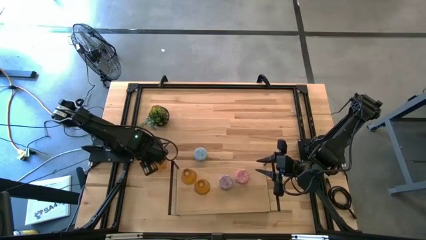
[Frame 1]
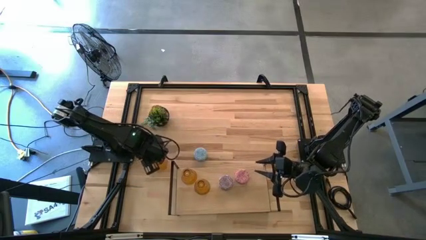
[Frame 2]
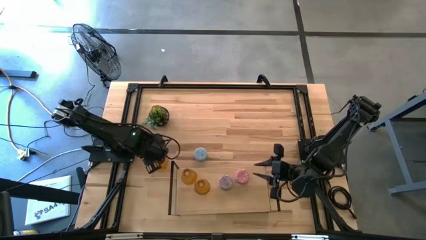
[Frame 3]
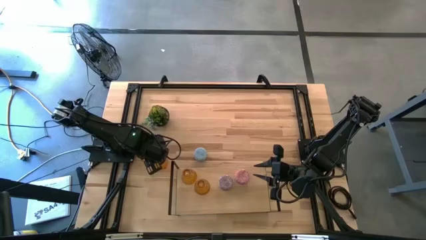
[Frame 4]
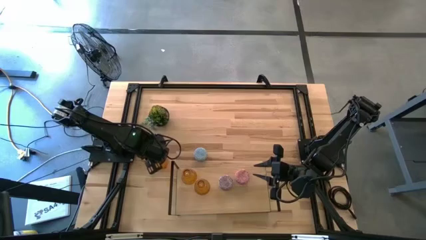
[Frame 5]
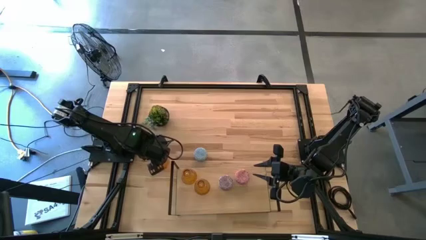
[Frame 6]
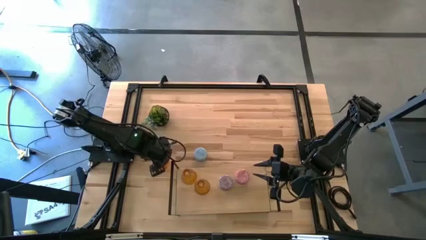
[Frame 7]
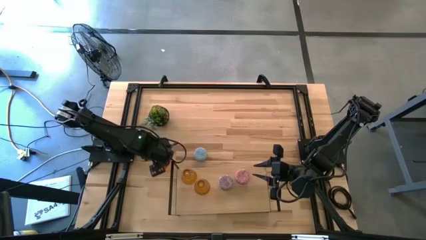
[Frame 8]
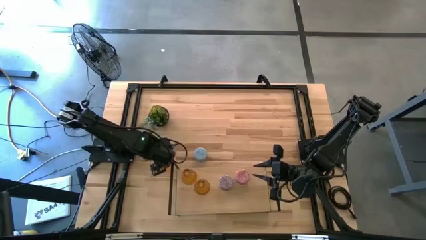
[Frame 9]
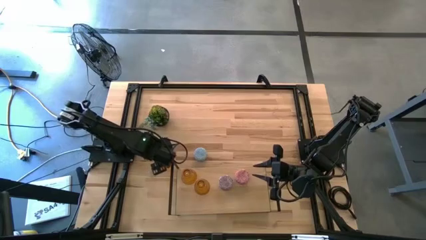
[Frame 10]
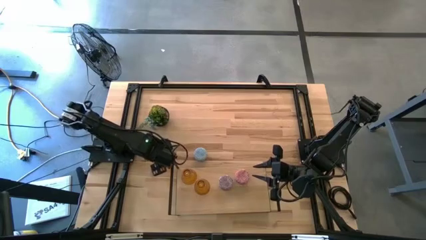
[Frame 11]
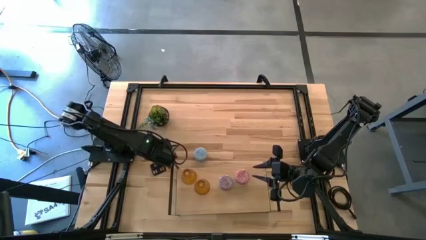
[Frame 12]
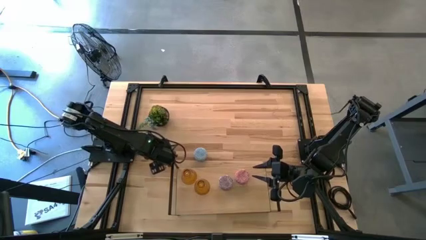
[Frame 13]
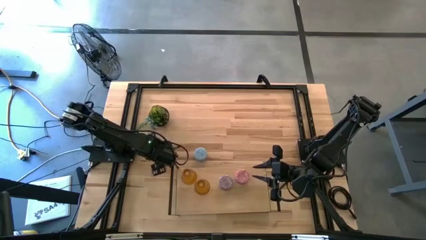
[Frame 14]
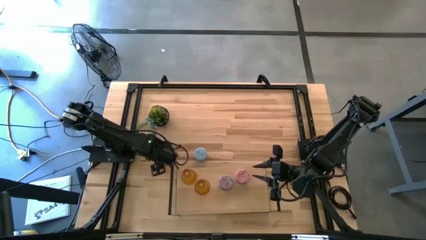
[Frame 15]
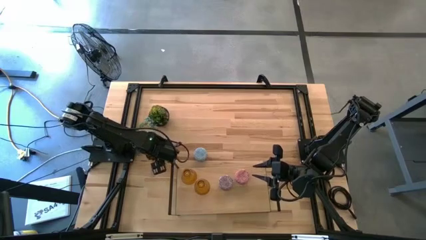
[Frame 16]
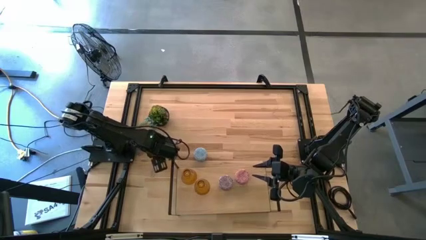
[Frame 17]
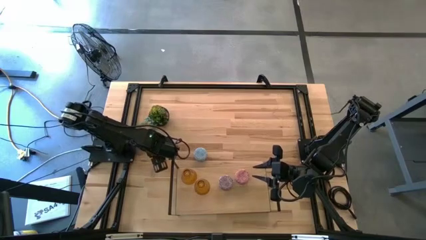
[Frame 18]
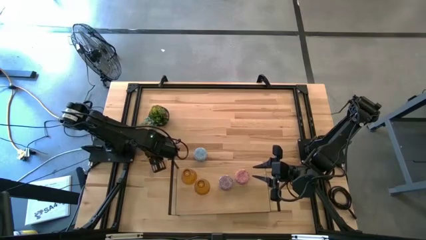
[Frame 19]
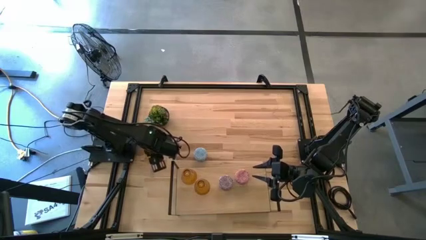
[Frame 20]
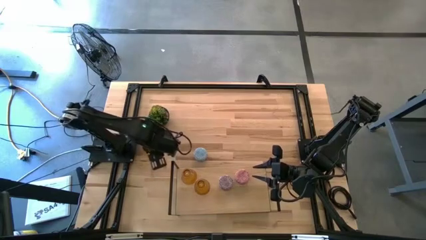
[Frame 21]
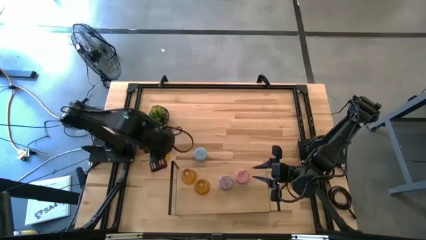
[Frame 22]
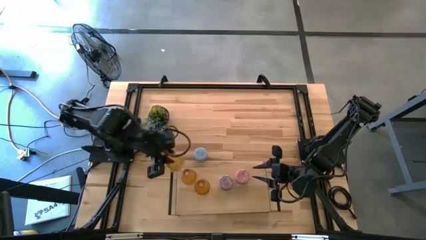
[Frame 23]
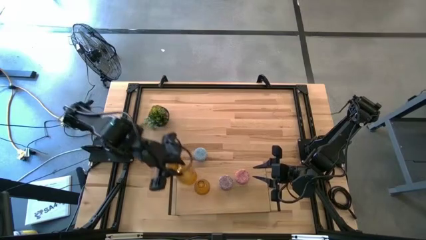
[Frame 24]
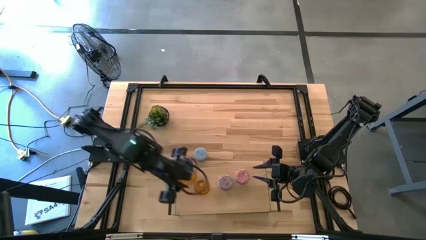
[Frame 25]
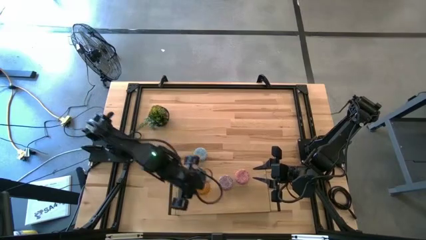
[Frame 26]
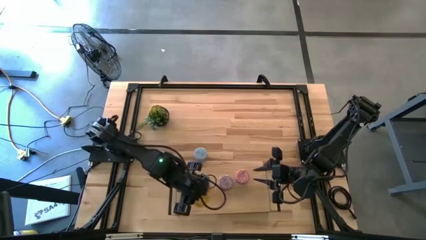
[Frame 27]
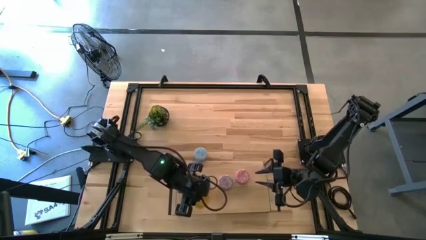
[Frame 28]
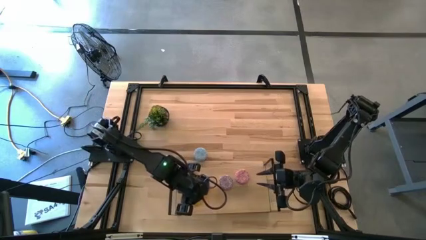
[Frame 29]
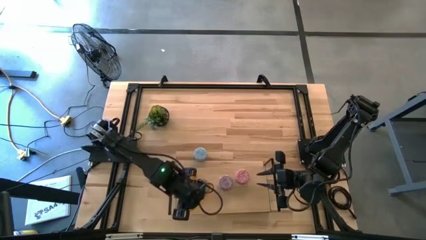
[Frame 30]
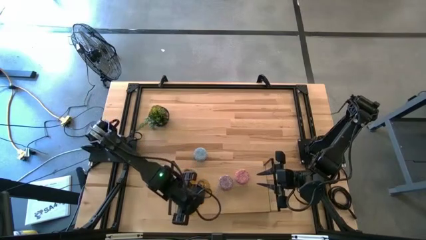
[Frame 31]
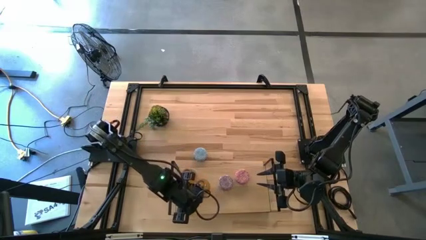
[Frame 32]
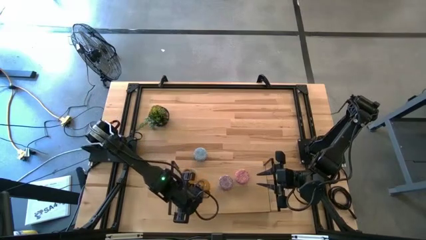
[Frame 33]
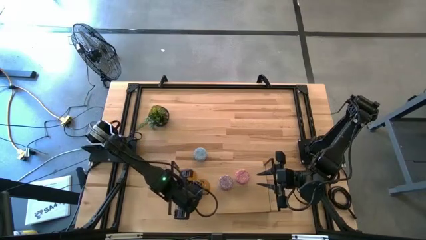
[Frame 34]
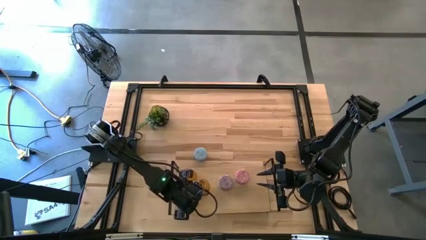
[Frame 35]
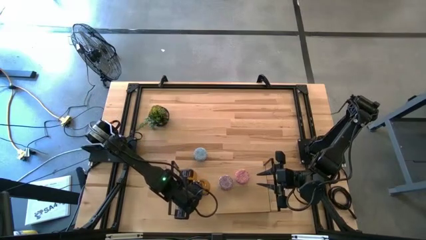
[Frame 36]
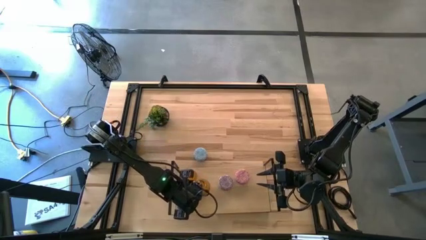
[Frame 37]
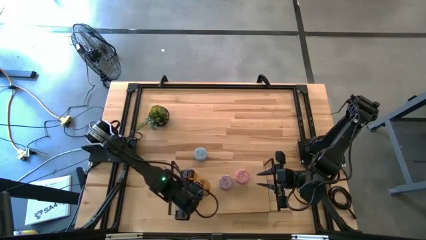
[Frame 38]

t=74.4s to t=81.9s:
Task: Pick & Place candle stick holders
Align the gold glass candle holder with the other gold glass candle holder on the shelf

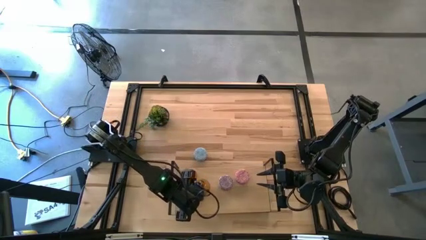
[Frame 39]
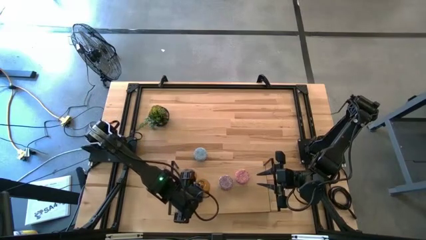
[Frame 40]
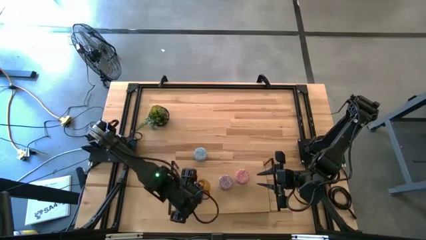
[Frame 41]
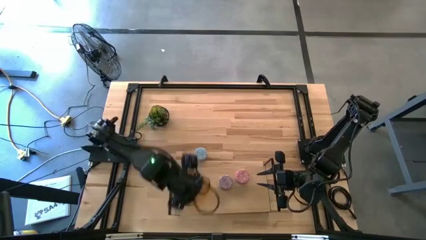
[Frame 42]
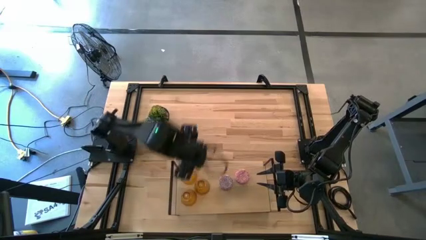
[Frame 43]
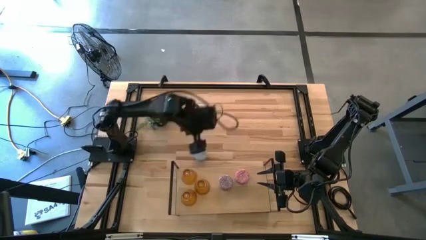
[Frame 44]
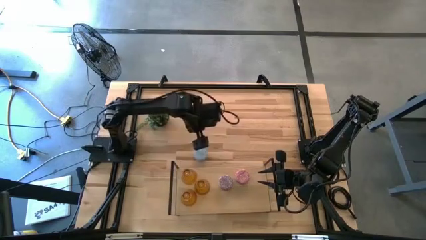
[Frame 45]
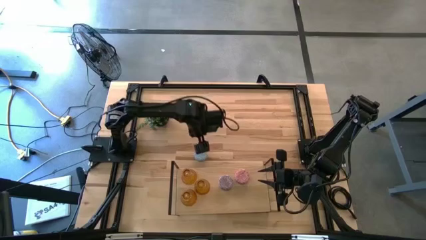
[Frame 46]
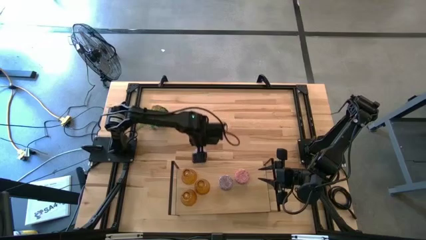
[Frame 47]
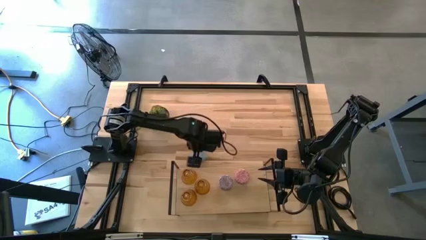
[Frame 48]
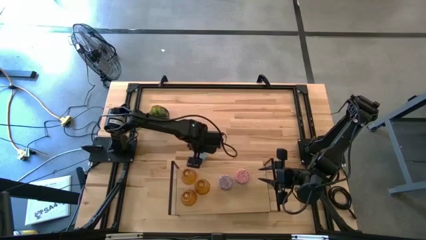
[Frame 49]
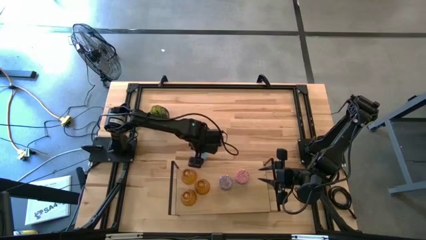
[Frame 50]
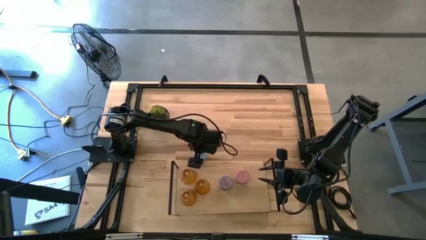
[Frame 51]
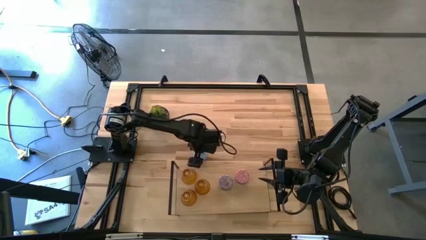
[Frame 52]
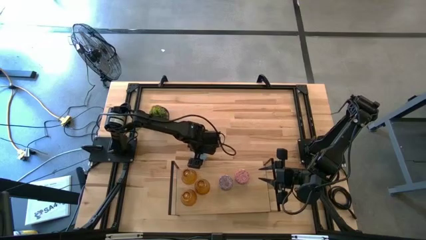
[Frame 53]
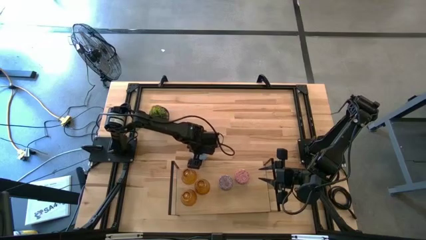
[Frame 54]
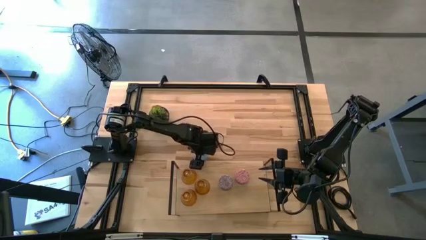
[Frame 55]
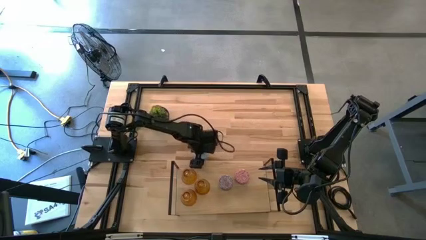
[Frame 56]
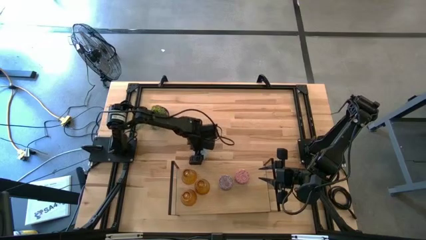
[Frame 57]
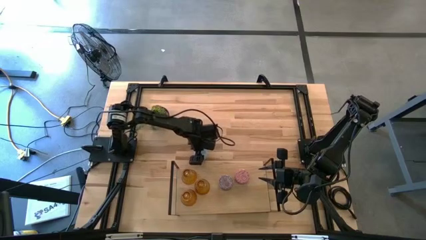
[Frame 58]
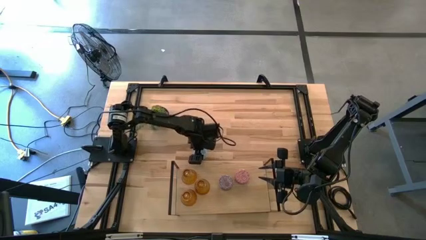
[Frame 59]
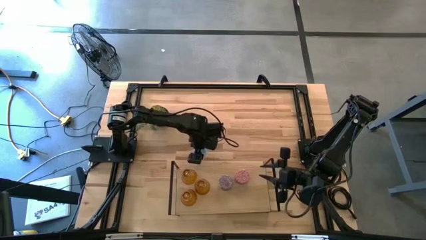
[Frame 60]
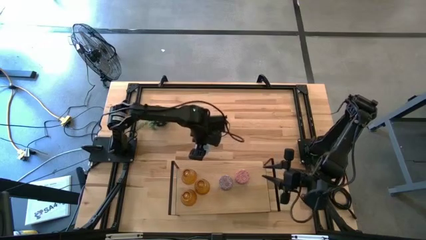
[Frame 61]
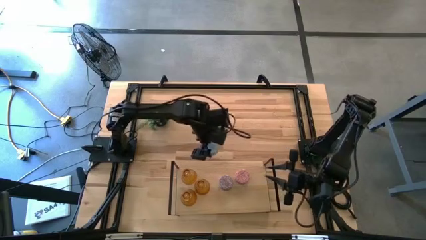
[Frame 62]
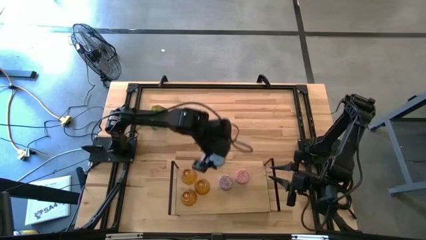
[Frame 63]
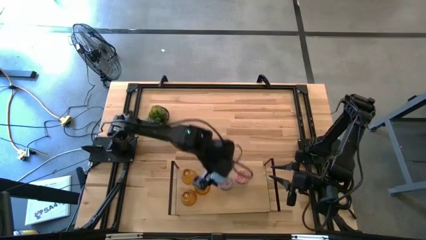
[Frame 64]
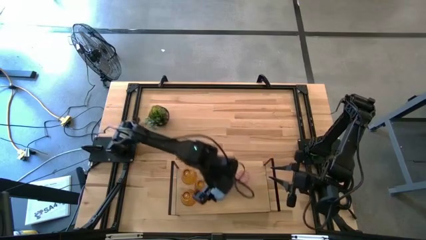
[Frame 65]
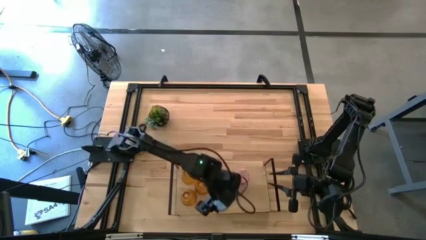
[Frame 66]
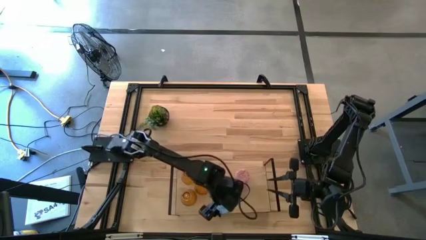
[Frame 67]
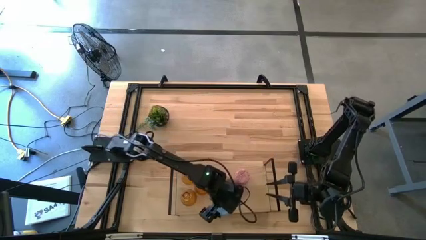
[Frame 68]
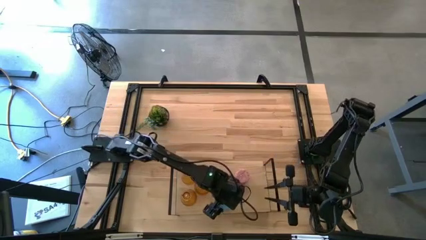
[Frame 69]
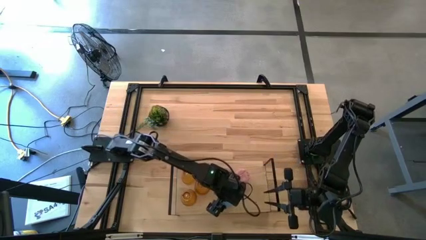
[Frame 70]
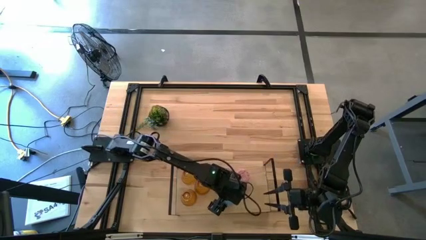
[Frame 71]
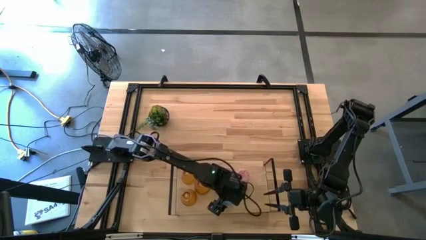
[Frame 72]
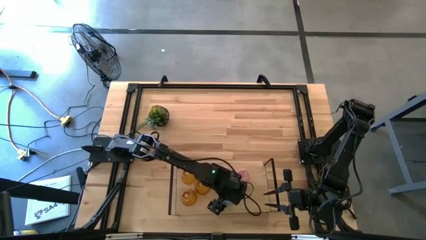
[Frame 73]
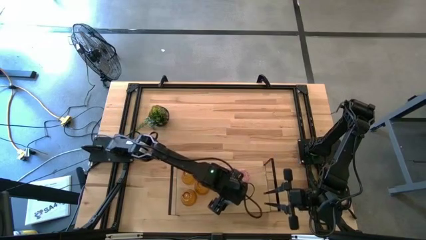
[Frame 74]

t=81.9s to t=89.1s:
Put the light blue scented candle on the shelf

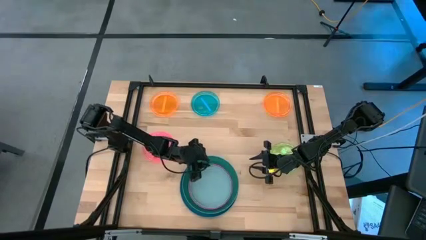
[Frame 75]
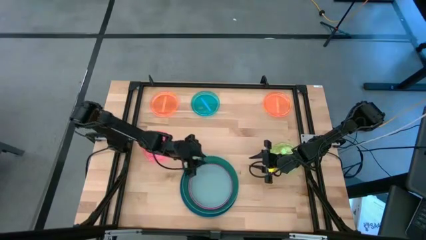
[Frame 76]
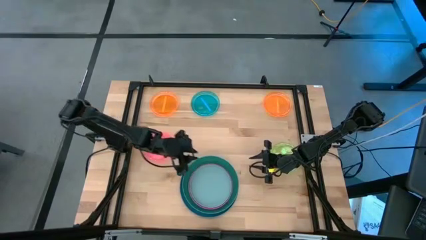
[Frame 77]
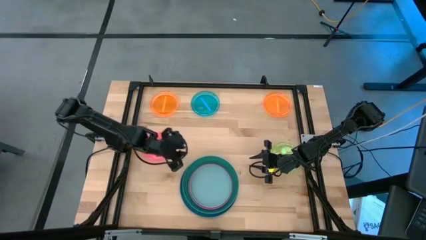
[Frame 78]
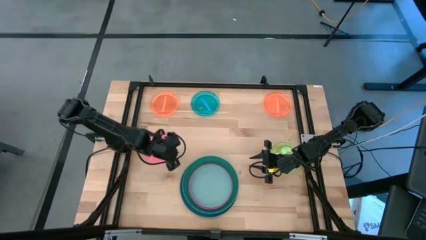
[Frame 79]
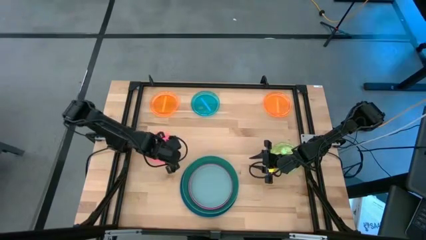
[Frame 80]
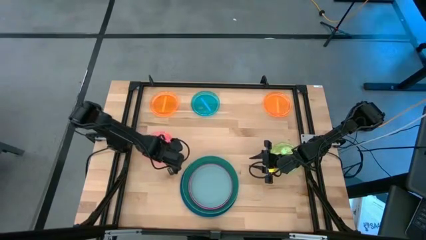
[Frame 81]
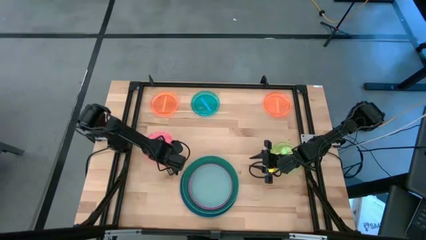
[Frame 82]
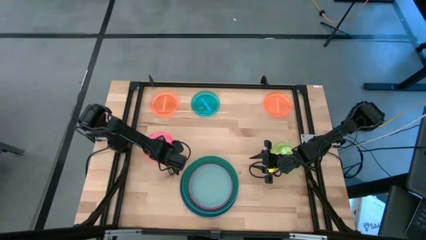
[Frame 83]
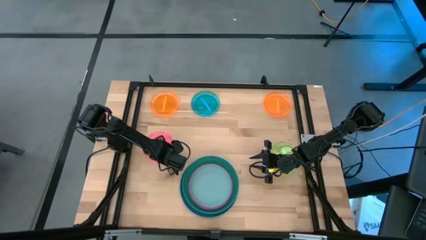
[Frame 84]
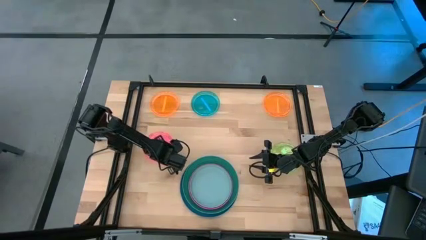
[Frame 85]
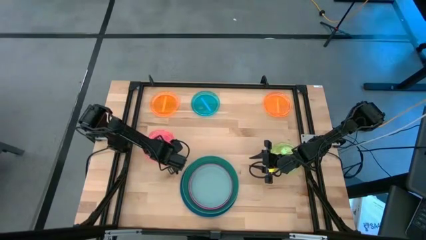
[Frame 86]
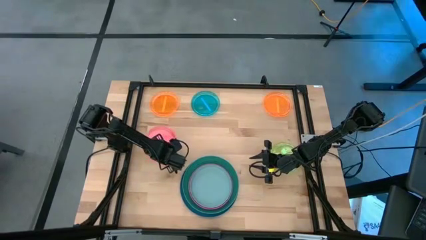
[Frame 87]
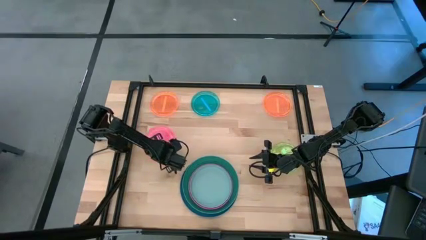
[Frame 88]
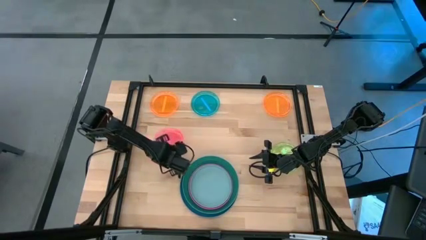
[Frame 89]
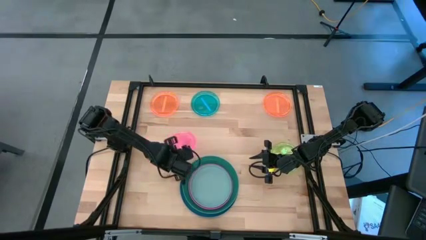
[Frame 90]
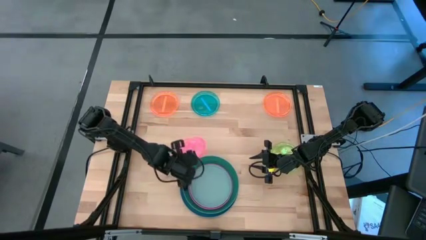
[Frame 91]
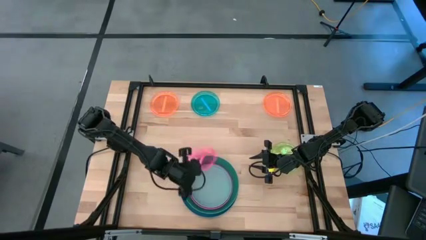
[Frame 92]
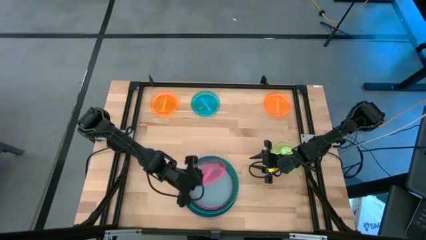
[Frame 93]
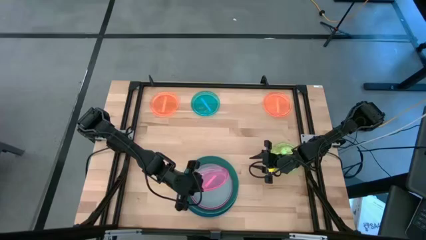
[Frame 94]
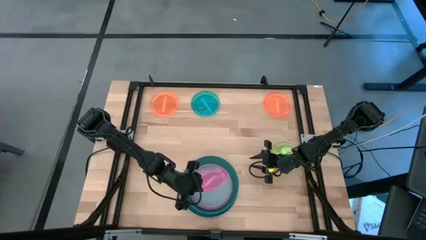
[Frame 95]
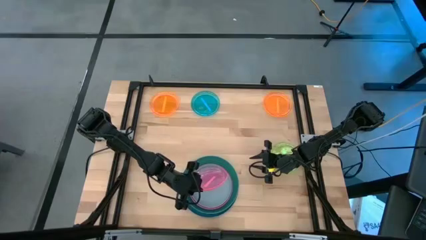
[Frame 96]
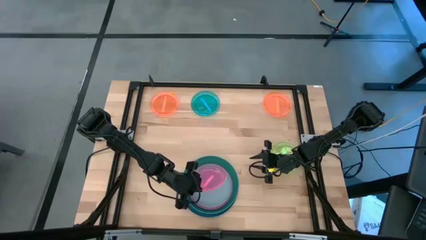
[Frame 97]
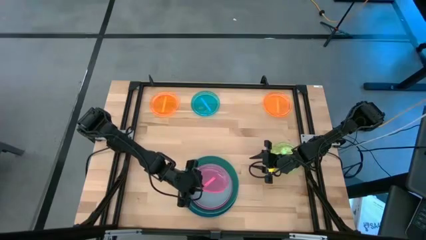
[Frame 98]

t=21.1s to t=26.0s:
Task: Stack plastic plates
Stack the light pink plate on the light blue plate
